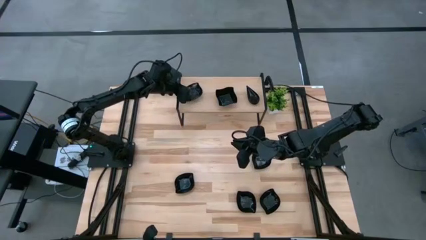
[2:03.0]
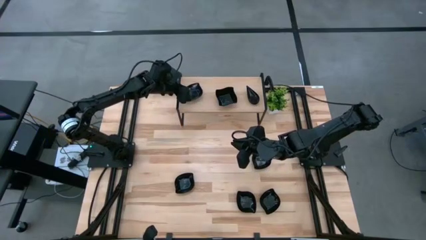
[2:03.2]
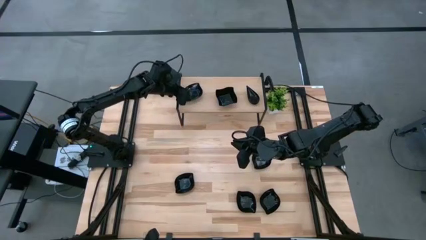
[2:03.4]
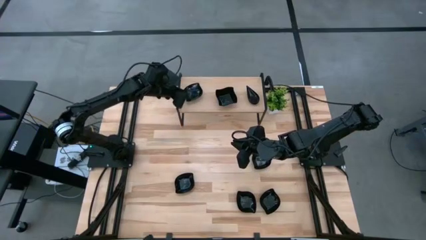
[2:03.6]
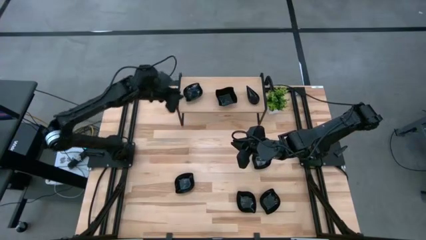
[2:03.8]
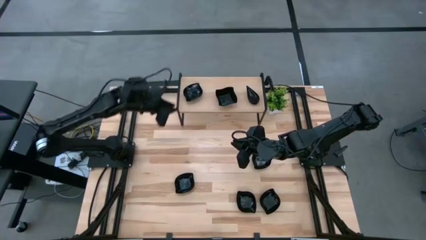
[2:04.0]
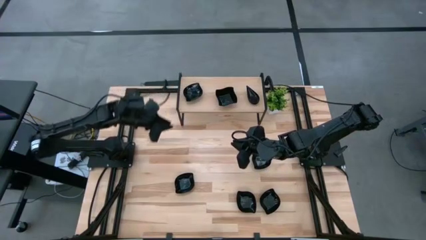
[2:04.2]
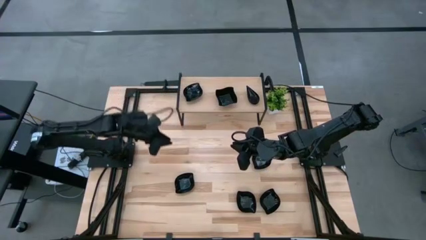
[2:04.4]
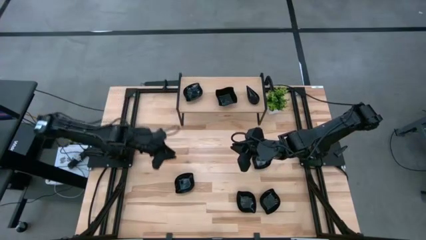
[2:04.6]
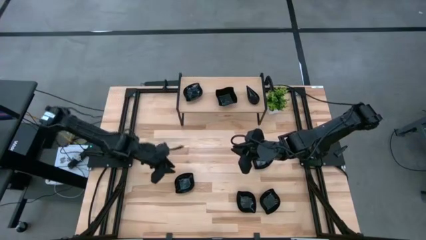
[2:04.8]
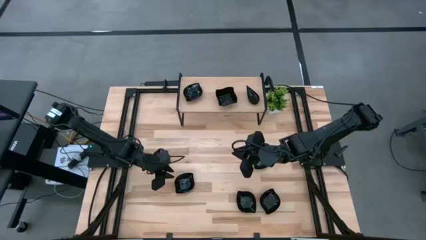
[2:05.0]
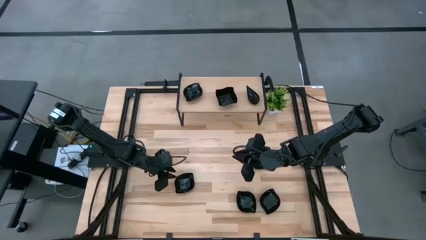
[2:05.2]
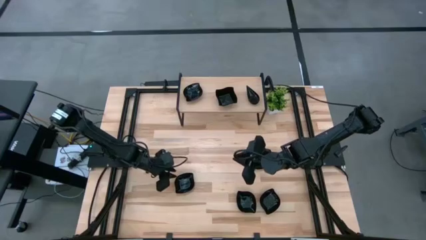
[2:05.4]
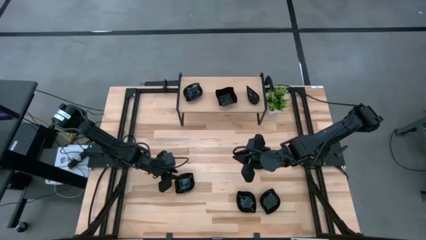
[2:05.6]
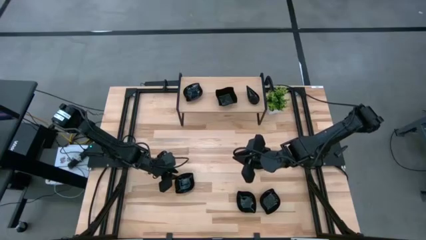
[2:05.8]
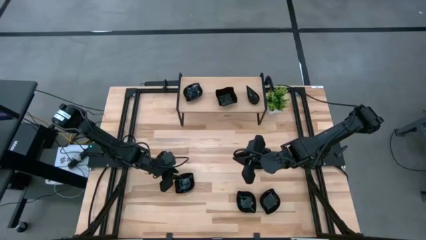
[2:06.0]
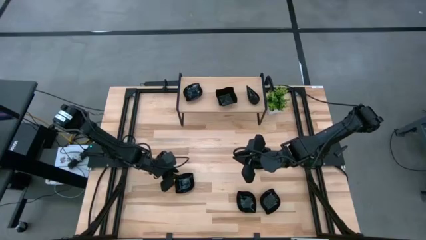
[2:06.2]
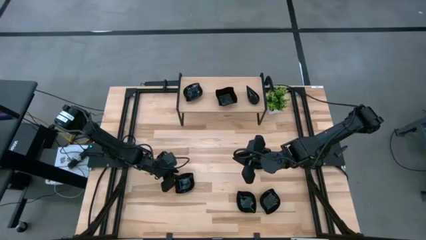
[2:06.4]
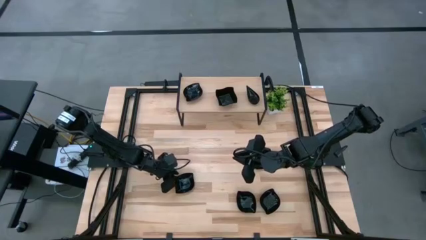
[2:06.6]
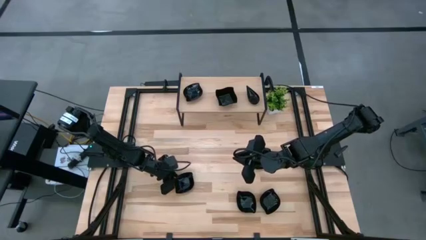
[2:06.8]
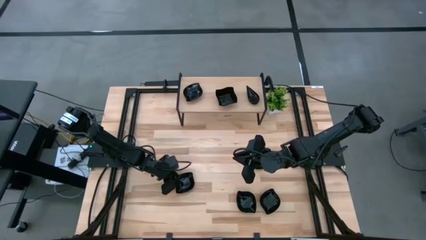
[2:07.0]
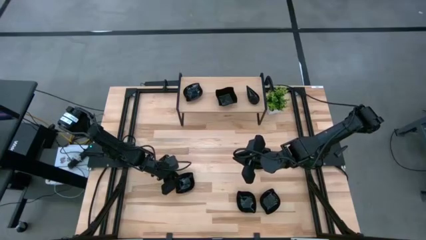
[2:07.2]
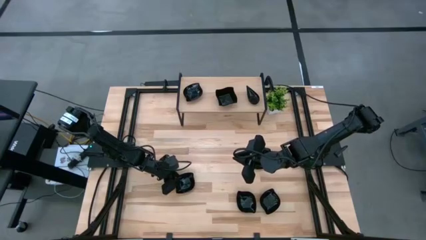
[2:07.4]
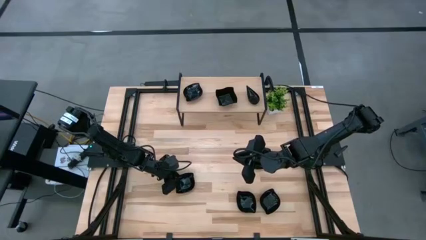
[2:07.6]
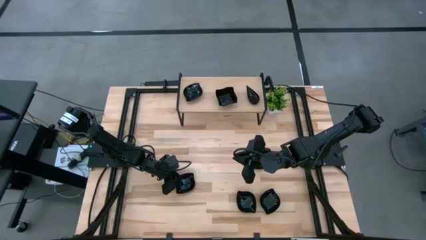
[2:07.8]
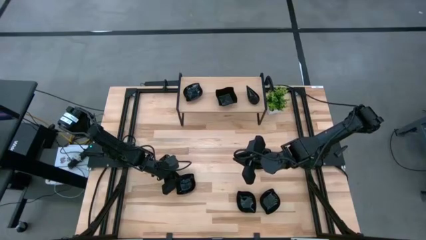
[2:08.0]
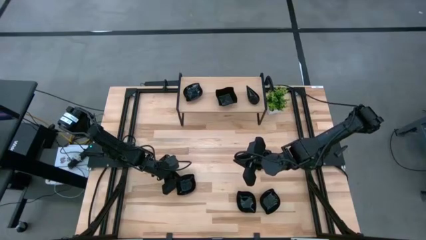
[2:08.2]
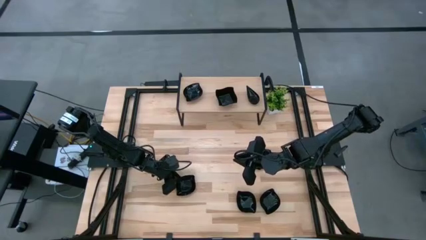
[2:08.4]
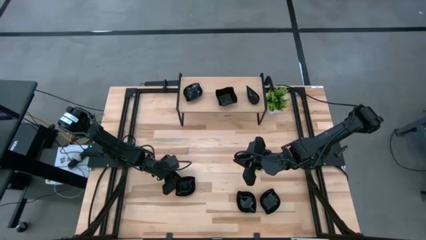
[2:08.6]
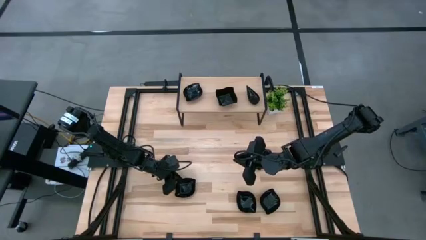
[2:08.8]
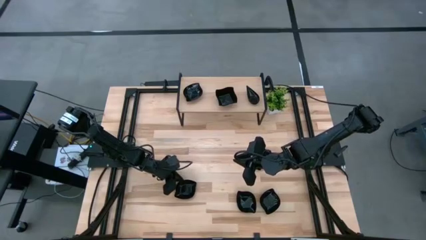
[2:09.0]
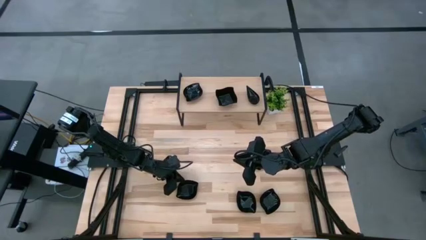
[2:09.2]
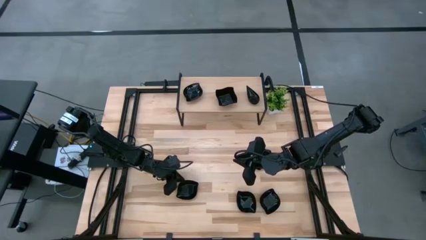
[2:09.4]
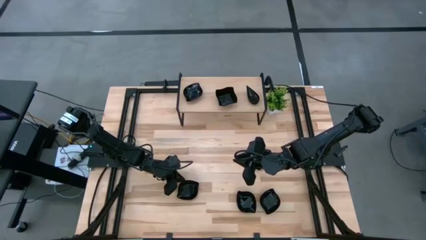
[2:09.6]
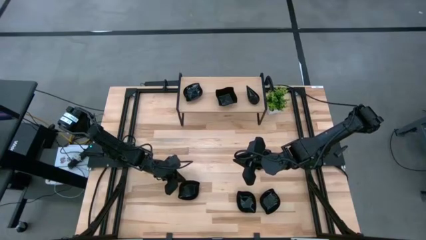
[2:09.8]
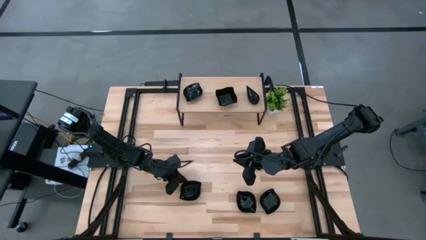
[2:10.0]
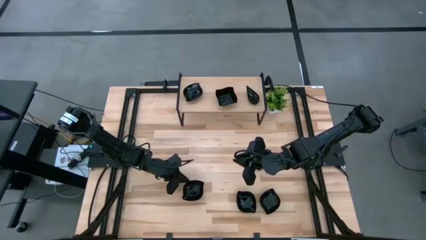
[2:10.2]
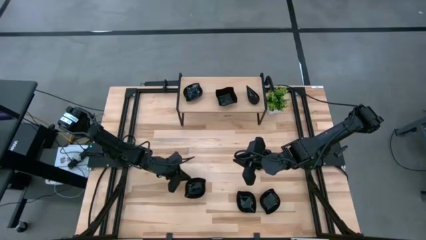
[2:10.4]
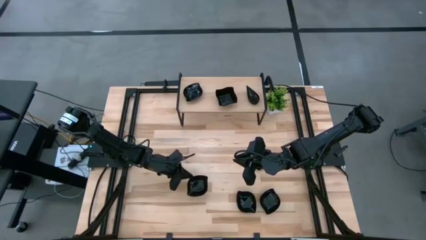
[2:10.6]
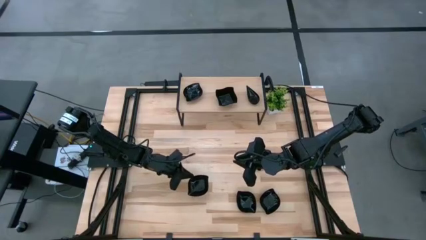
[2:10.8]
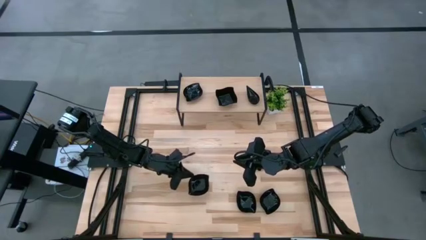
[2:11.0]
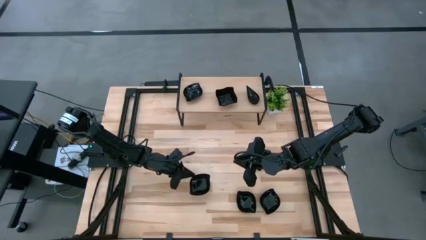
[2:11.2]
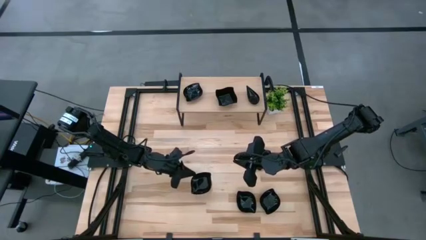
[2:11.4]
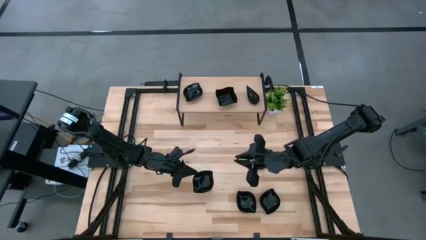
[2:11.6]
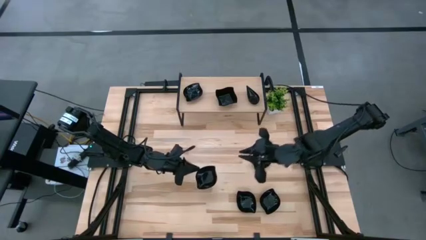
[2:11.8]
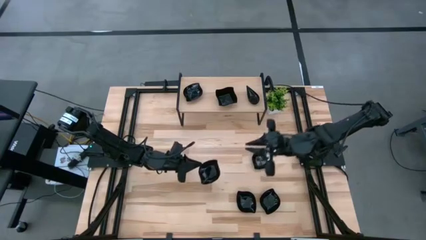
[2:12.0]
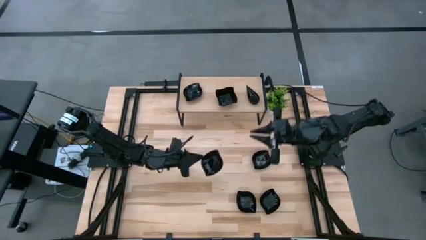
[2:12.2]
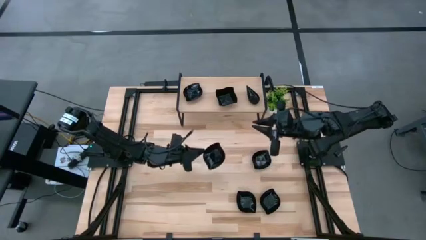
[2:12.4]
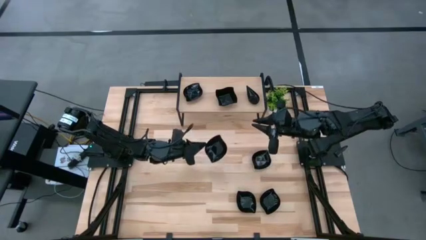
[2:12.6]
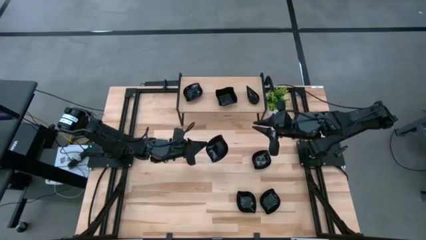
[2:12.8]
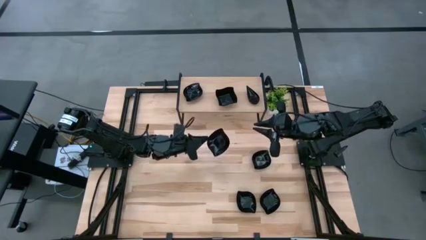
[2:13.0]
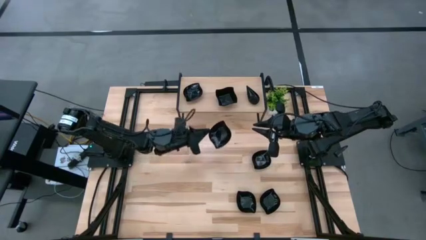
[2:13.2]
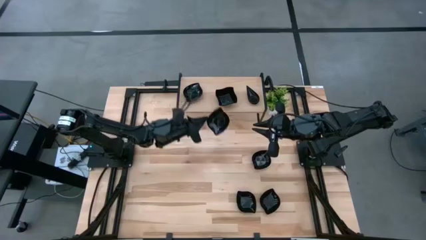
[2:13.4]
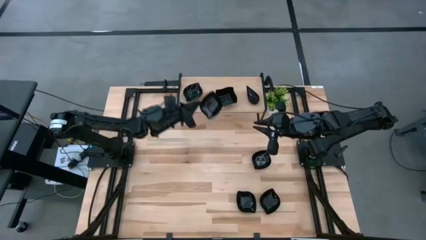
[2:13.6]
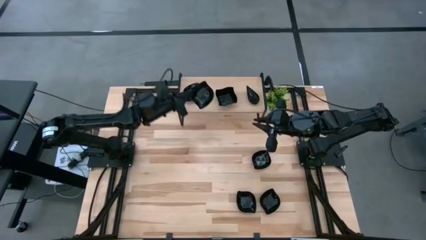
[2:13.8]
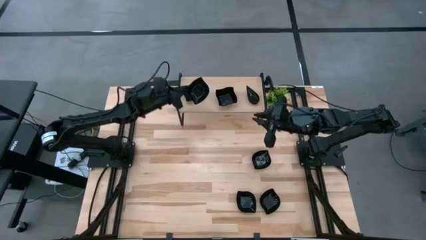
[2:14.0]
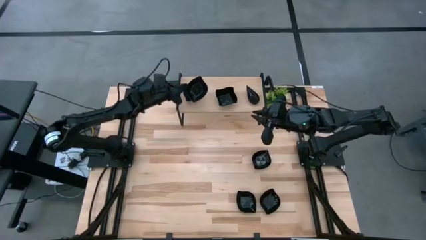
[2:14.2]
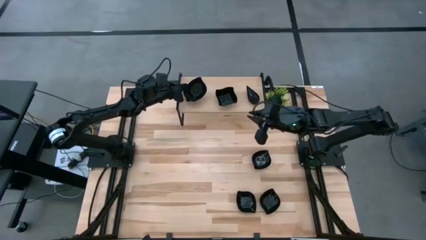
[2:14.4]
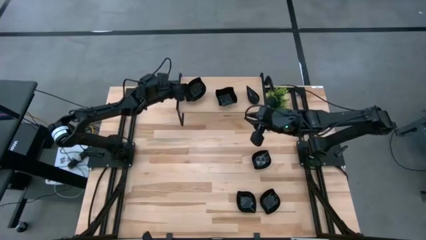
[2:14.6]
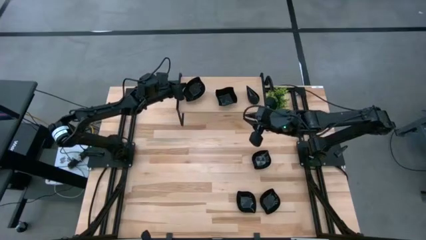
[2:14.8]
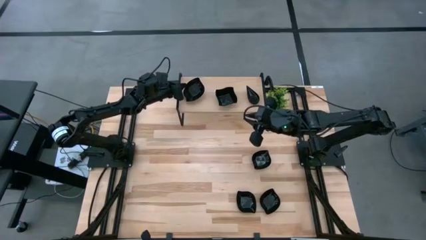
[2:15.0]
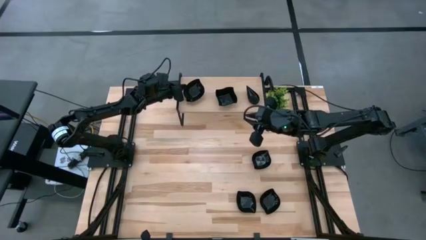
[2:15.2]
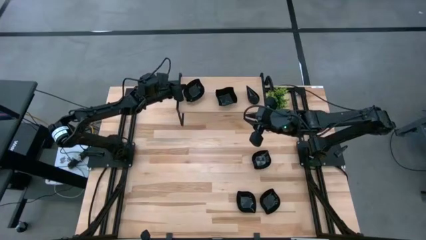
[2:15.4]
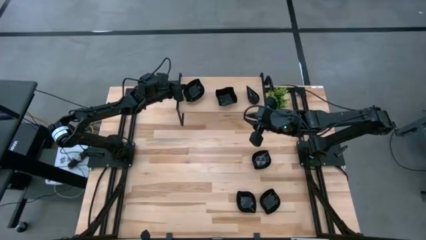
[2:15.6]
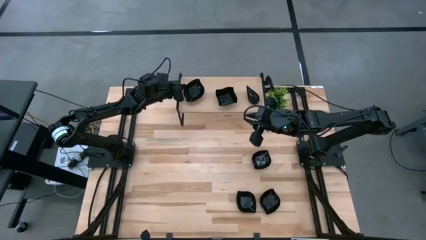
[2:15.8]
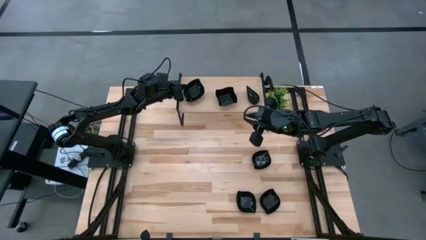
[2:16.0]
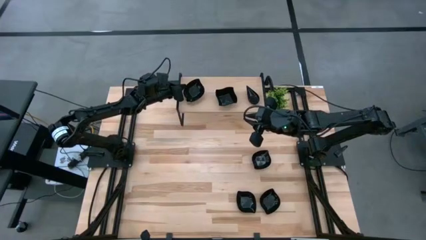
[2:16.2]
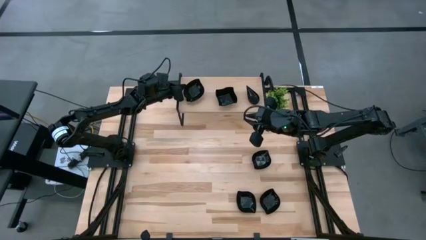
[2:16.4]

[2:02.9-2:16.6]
Task: Pick & Place Mini shaped plates
Stack the black leaf shaped plate on top of the black leaf shaped plate on the shelf
